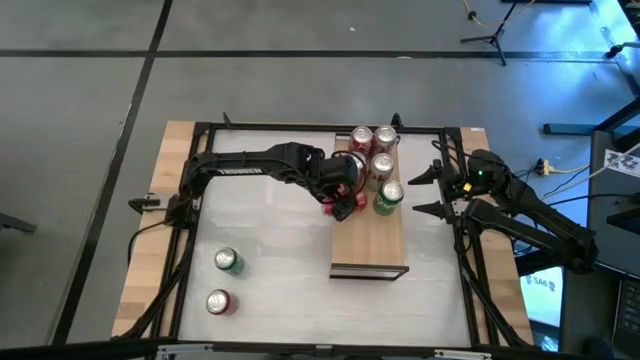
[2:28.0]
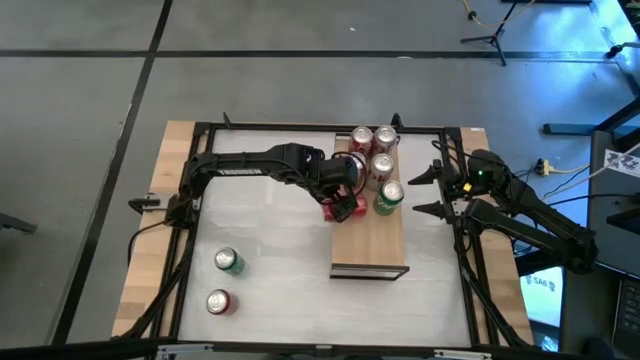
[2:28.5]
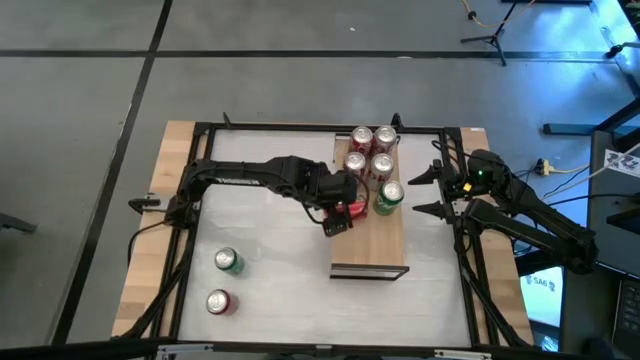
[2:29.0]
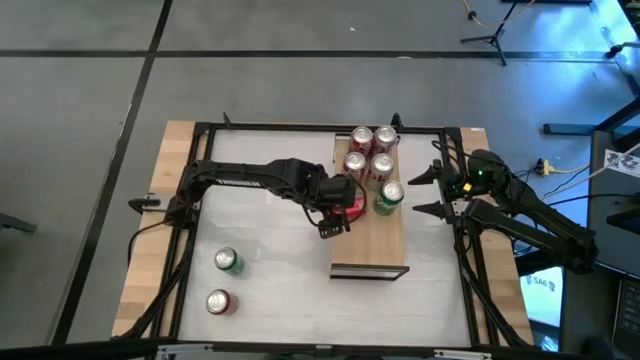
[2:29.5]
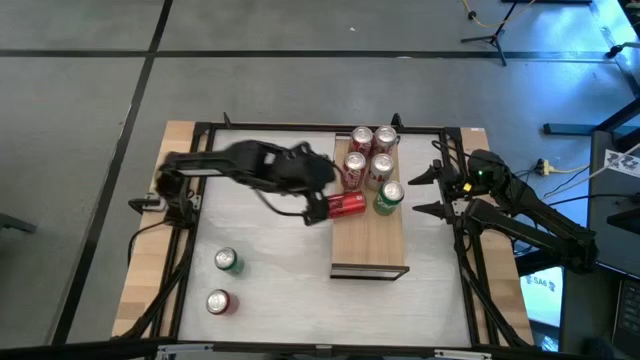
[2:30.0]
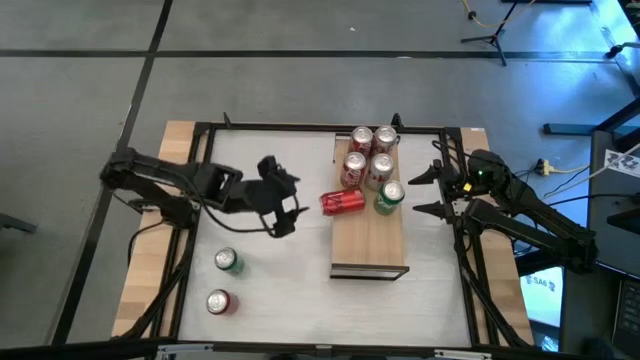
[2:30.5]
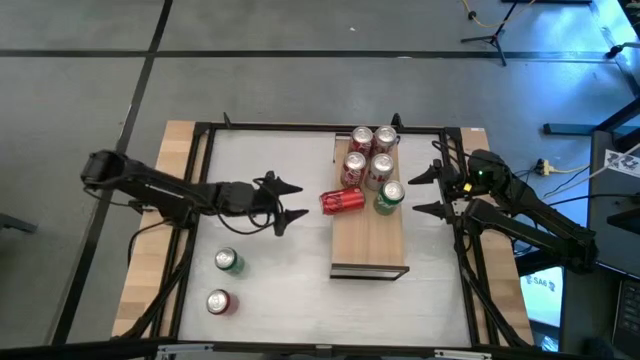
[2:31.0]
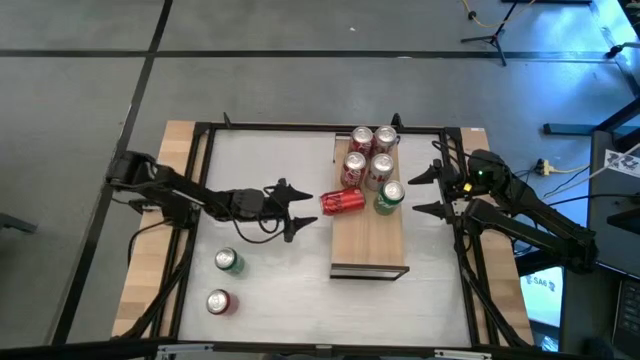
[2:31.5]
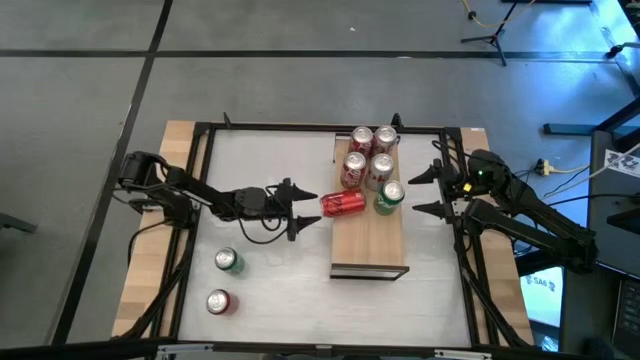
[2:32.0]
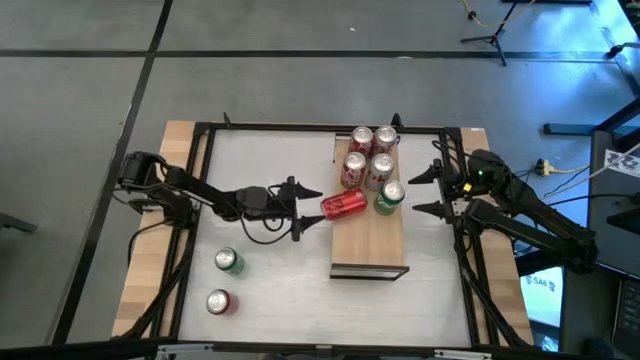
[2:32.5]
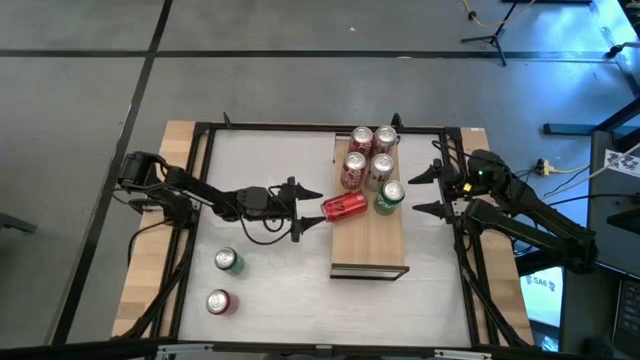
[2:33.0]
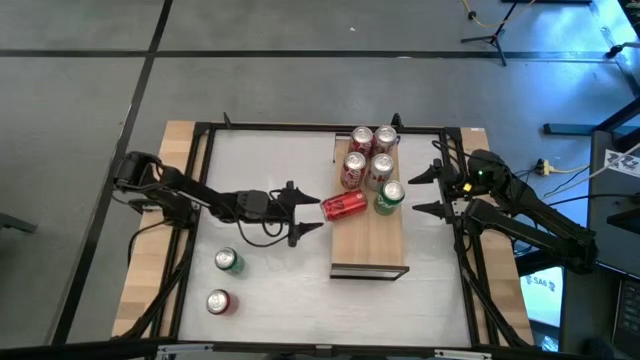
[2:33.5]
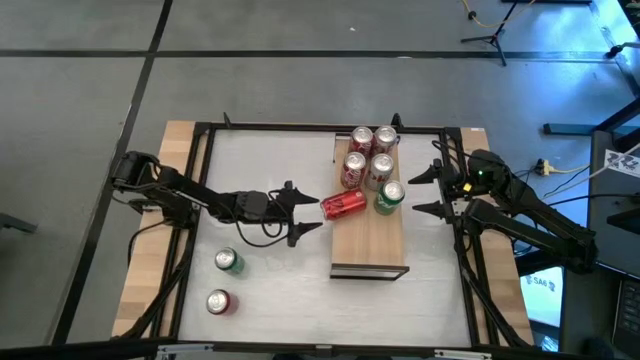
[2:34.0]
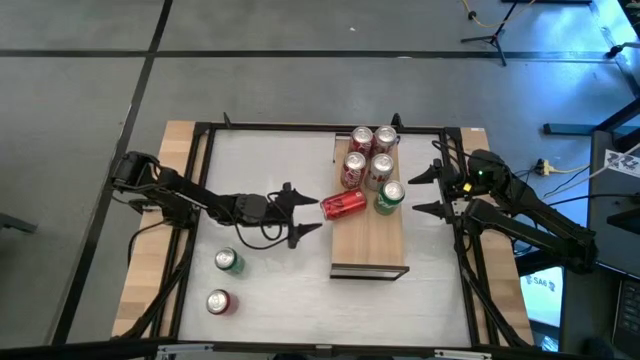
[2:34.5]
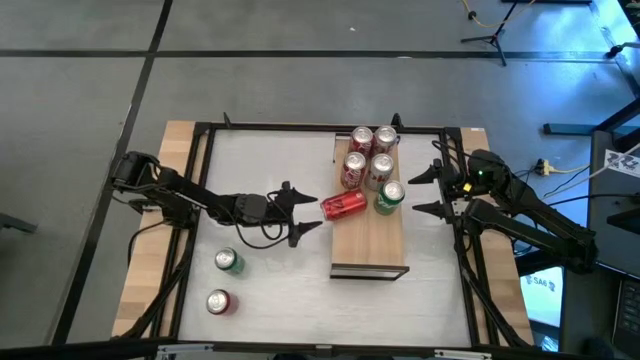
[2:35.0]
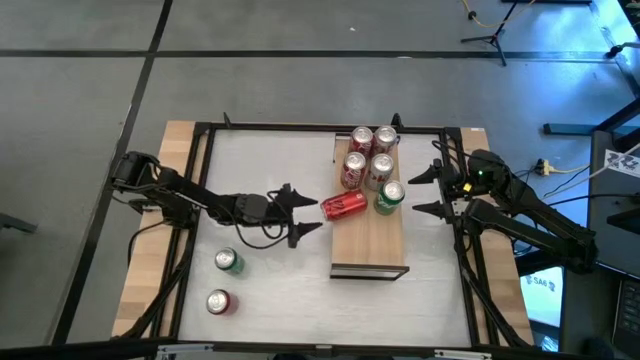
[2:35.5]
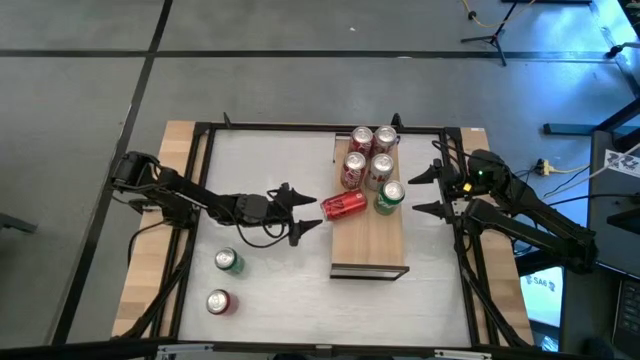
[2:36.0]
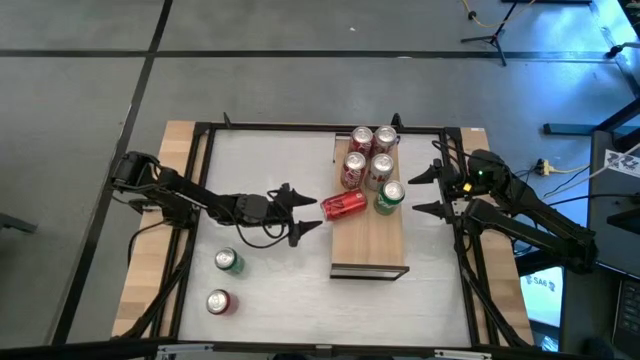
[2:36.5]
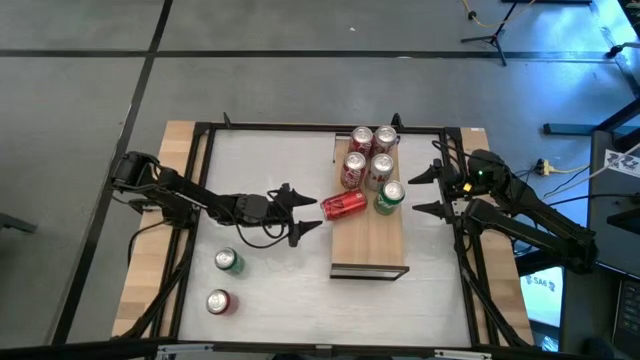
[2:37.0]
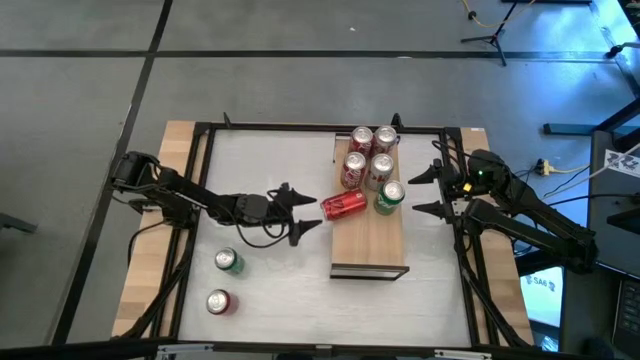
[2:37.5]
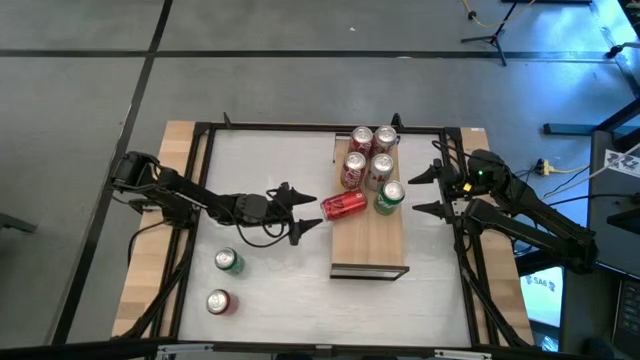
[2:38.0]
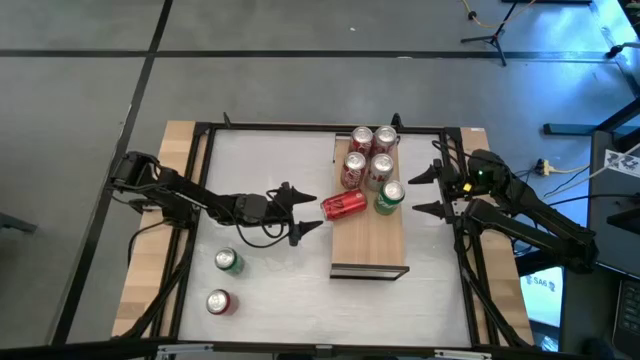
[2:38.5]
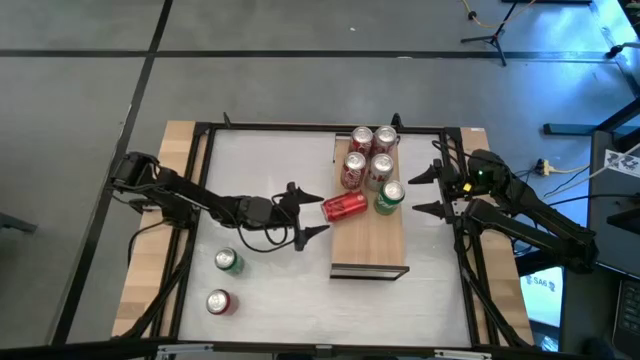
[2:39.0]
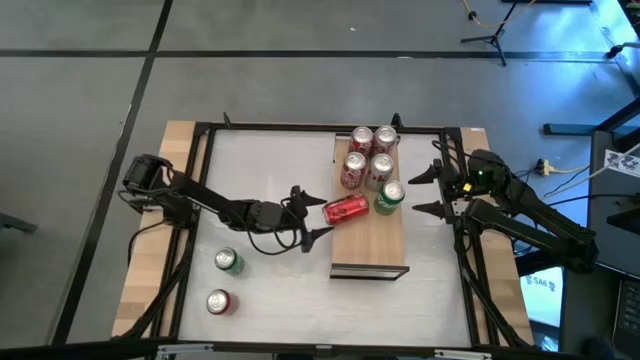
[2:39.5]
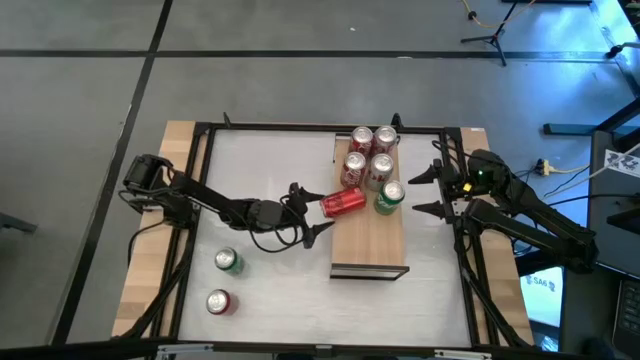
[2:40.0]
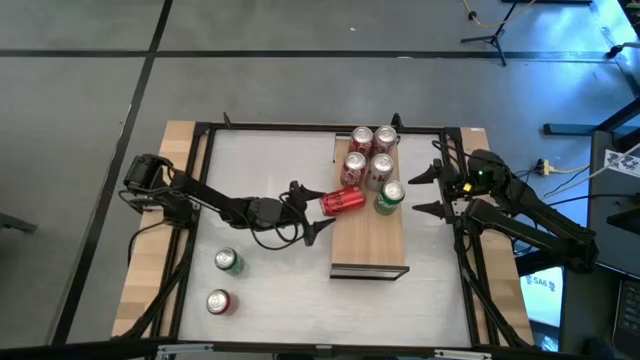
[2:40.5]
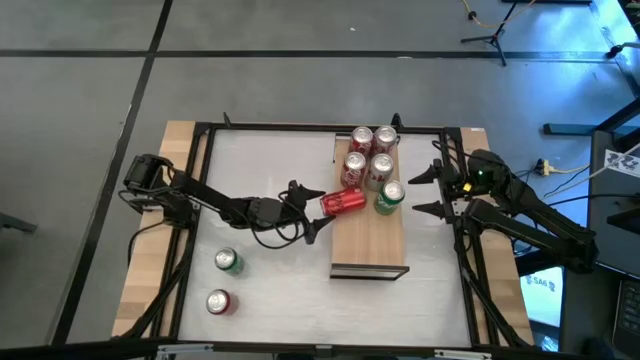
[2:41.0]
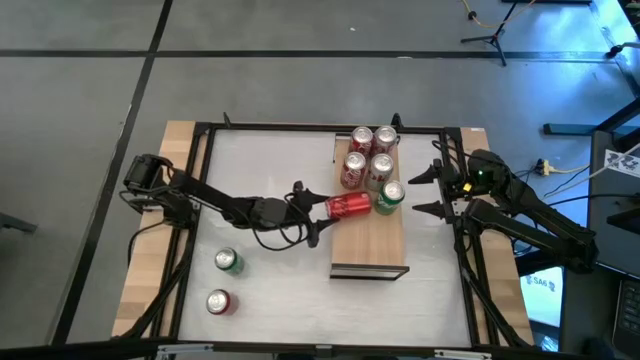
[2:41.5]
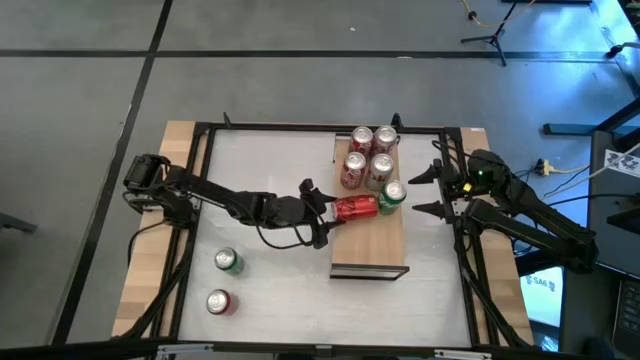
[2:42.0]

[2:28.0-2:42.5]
Task: Place canned beverage on shelf
Put the top red black soda can on the shelf

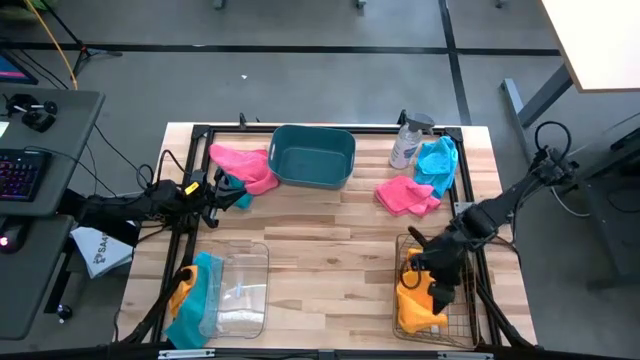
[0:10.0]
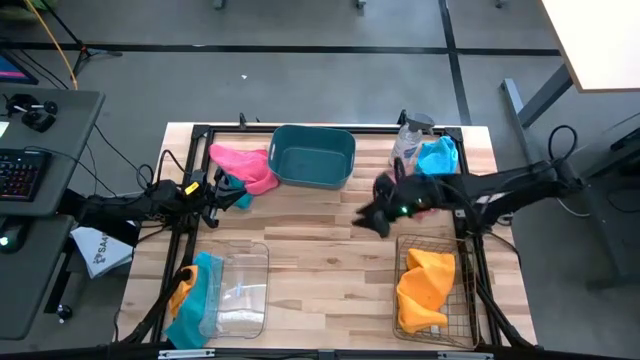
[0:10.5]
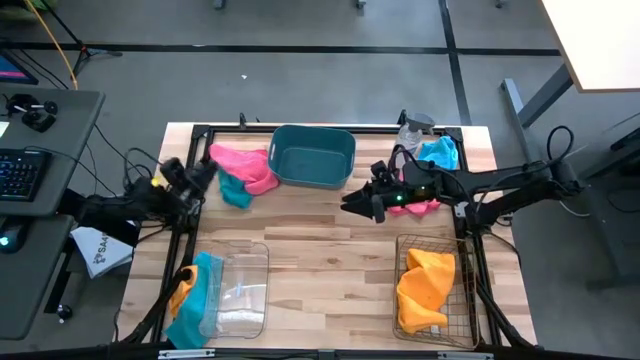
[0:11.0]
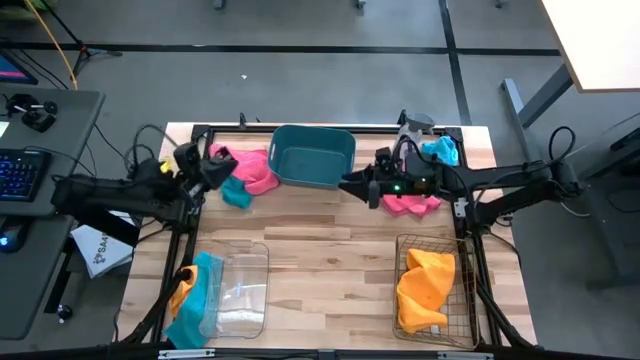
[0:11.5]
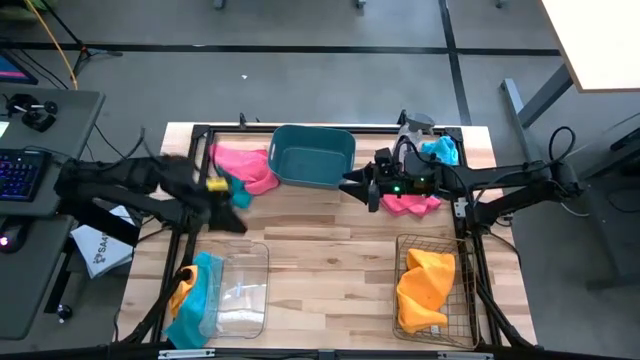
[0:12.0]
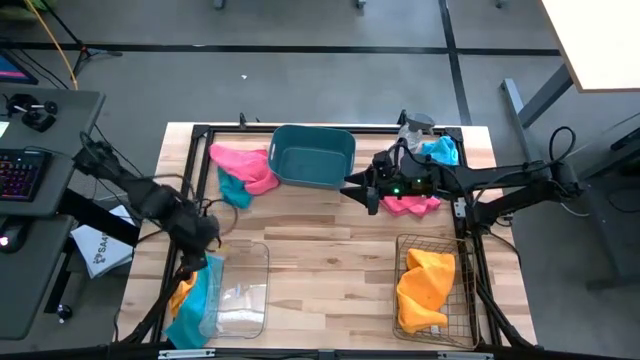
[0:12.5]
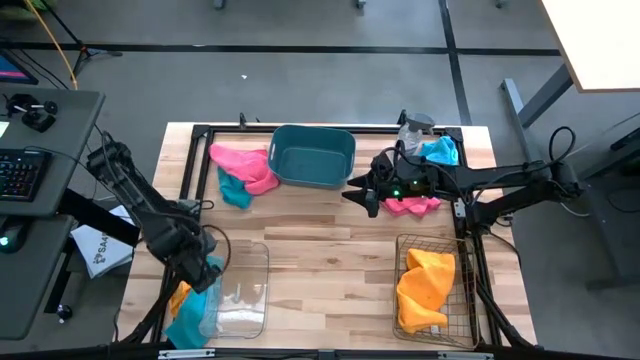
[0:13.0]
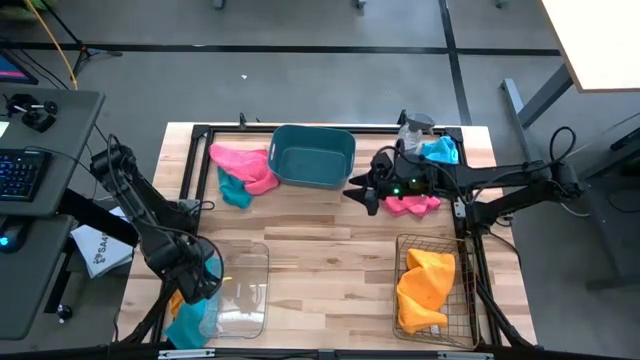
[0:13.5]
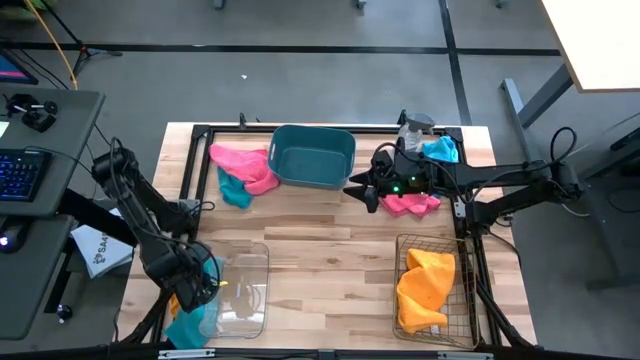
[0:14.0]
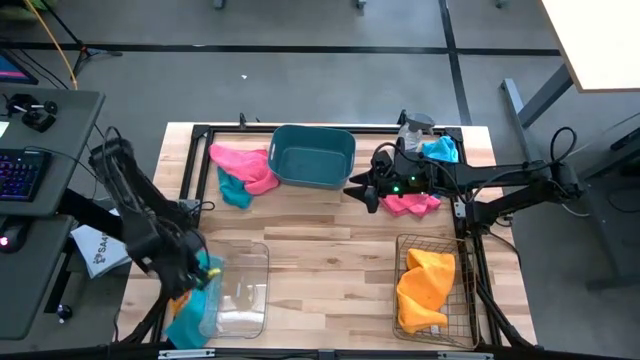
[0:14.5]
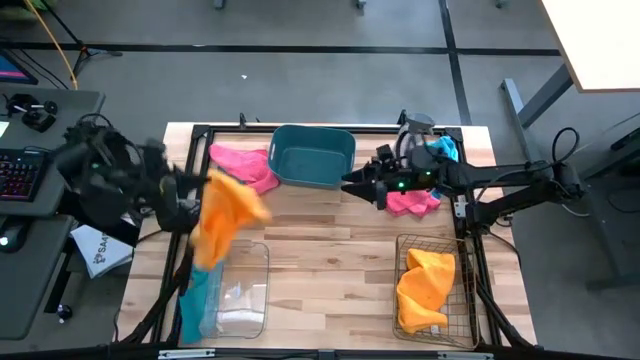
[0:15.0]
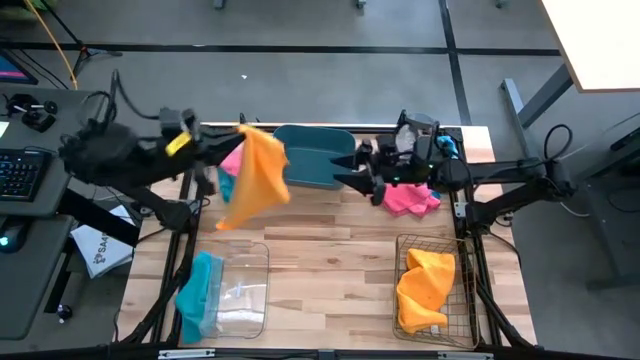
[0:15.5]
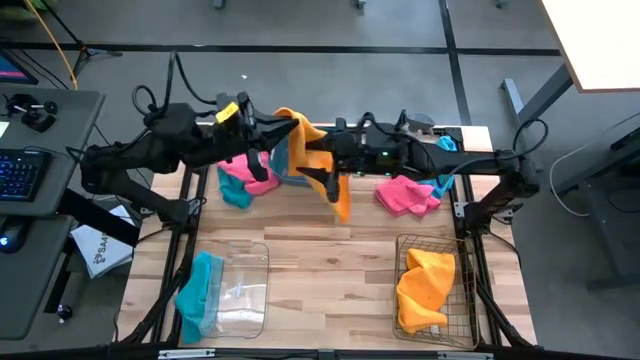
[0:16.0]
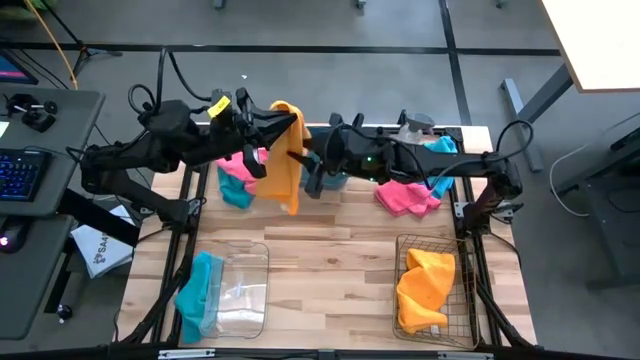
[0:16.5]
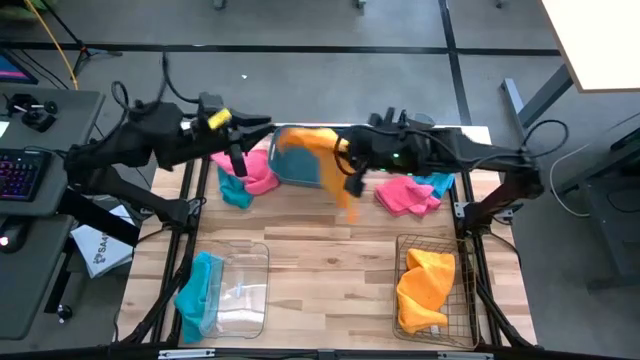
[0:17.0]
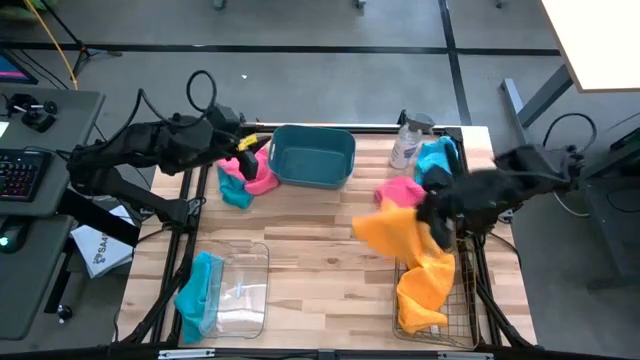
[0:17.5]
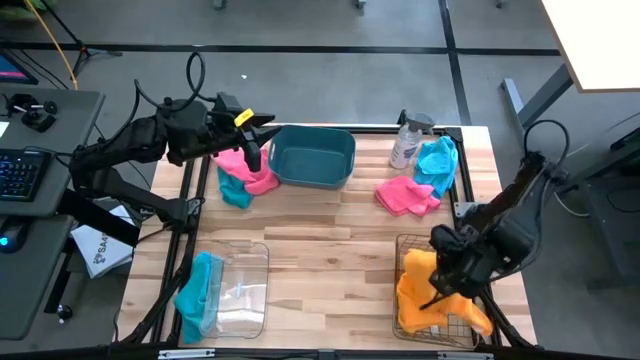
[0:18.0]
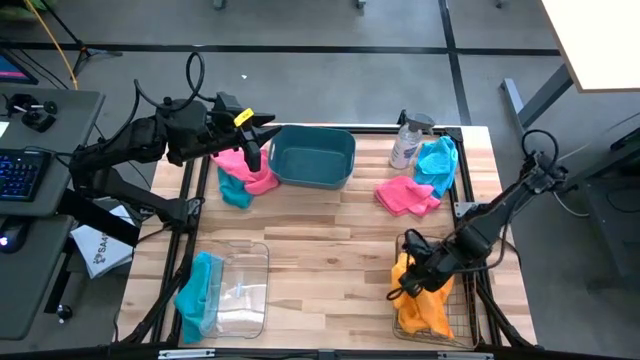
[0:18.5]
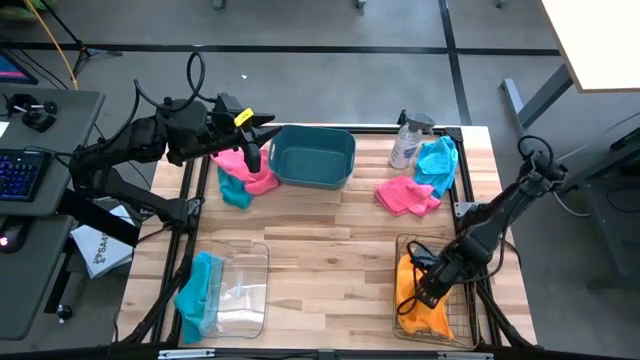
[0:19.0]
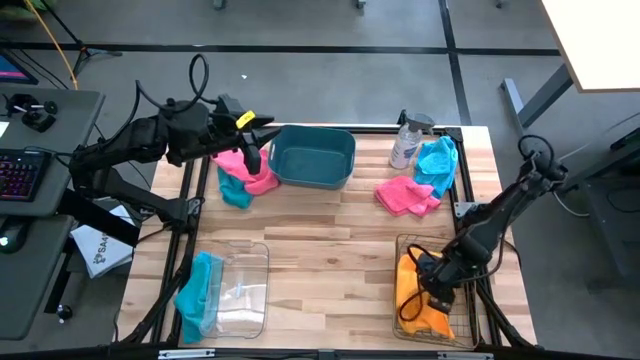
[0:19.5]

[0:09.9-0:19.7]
Task: Sort microfiber towel by color & place in baskets
Put the orange microfiber towel into the wire basket
